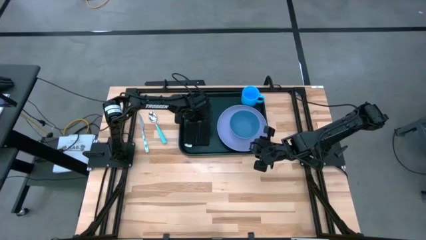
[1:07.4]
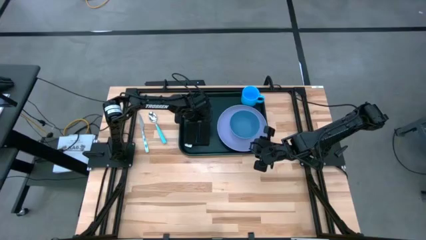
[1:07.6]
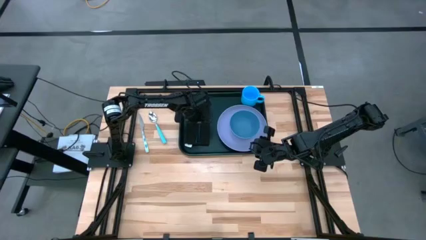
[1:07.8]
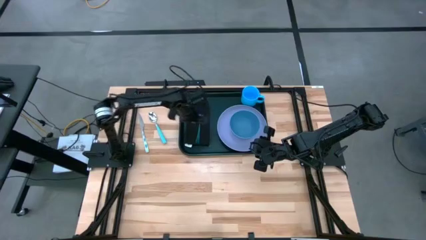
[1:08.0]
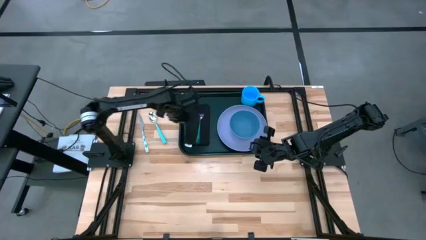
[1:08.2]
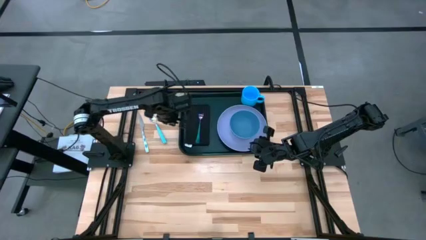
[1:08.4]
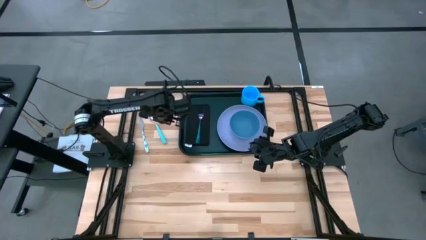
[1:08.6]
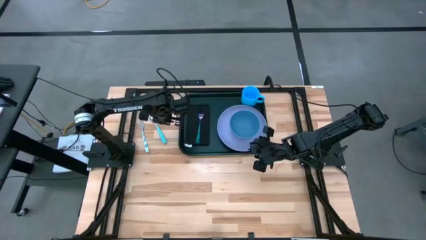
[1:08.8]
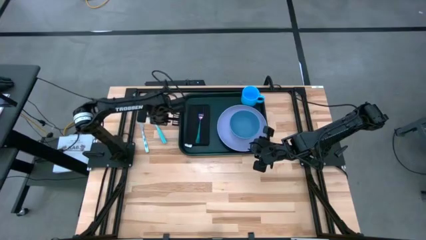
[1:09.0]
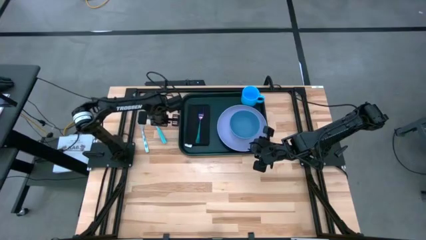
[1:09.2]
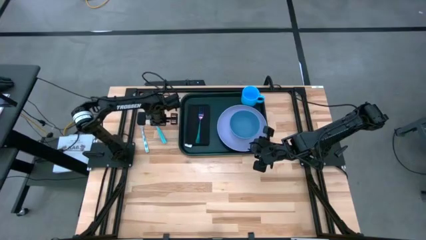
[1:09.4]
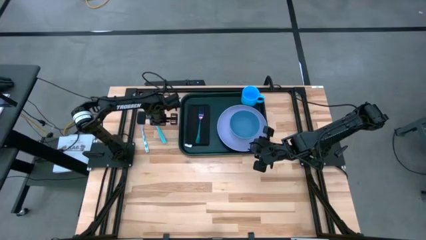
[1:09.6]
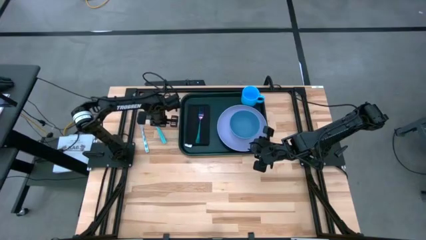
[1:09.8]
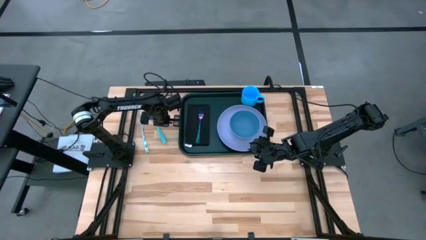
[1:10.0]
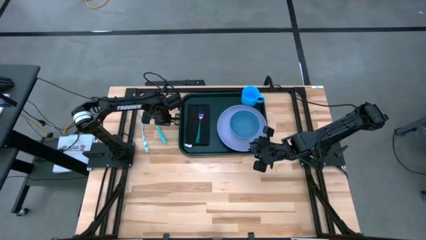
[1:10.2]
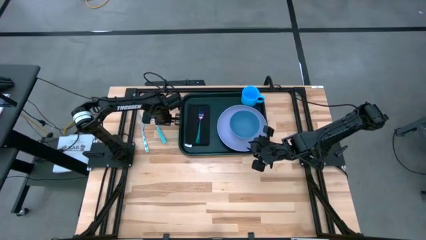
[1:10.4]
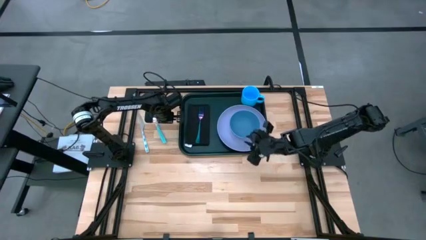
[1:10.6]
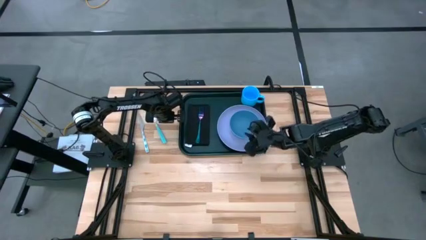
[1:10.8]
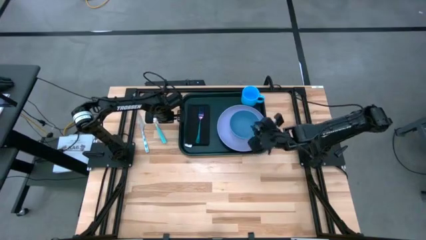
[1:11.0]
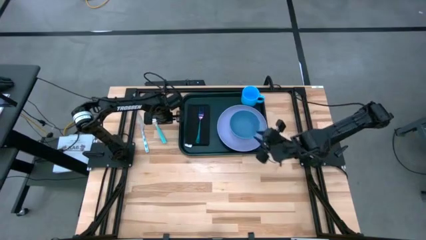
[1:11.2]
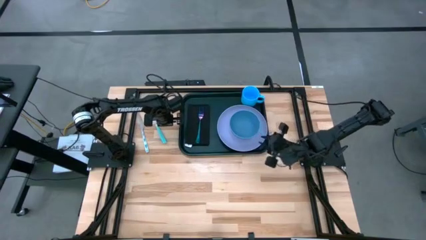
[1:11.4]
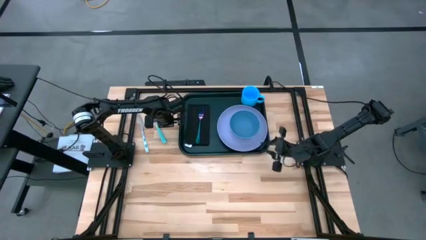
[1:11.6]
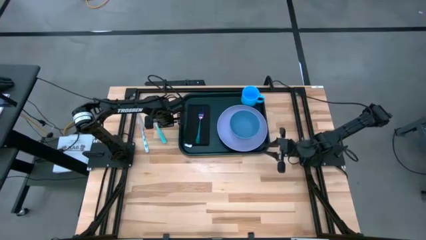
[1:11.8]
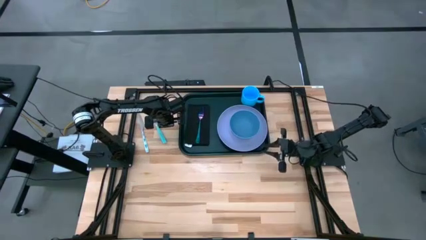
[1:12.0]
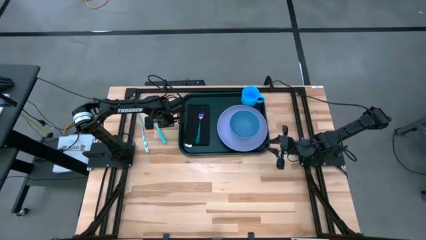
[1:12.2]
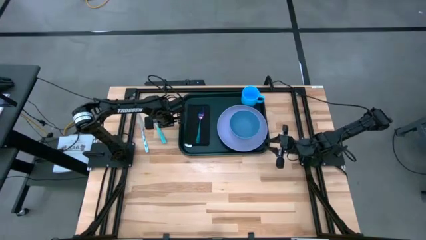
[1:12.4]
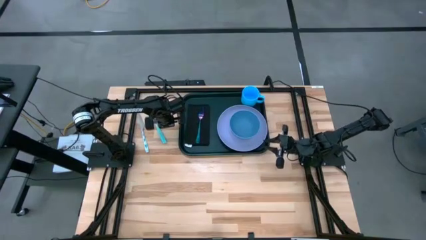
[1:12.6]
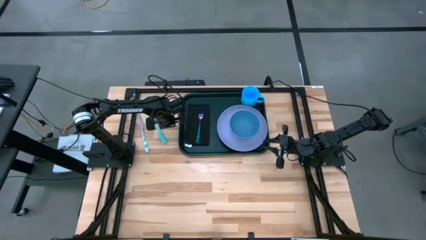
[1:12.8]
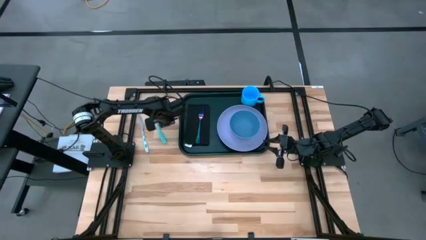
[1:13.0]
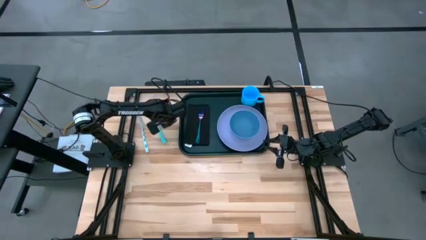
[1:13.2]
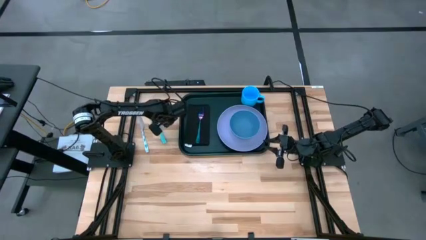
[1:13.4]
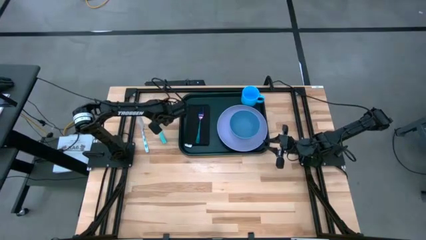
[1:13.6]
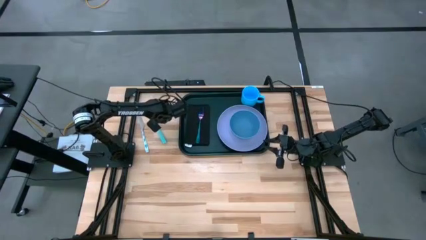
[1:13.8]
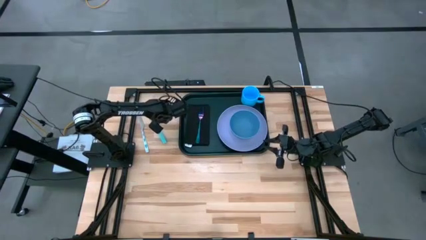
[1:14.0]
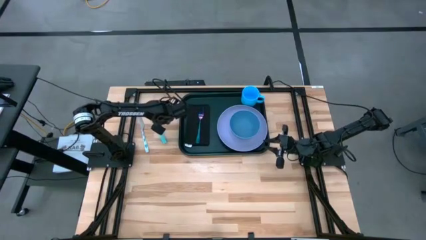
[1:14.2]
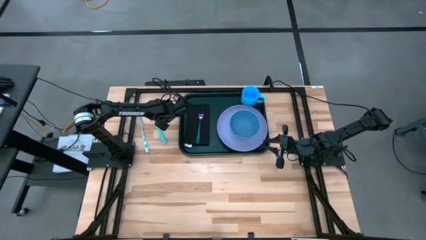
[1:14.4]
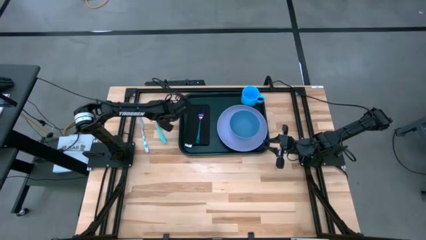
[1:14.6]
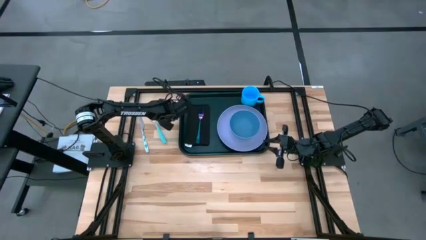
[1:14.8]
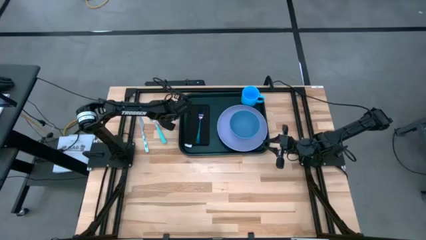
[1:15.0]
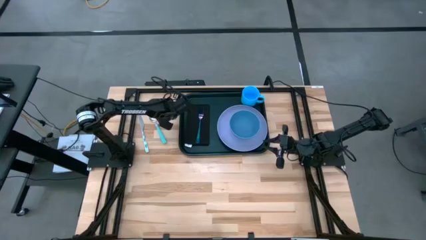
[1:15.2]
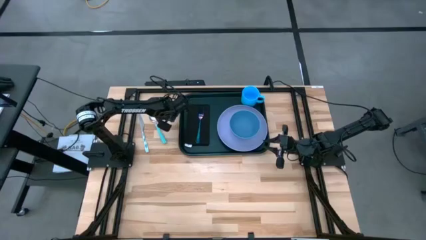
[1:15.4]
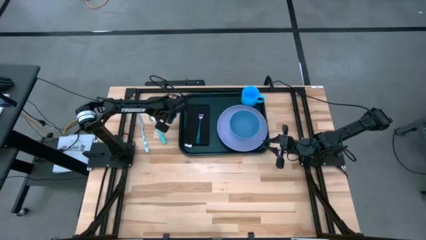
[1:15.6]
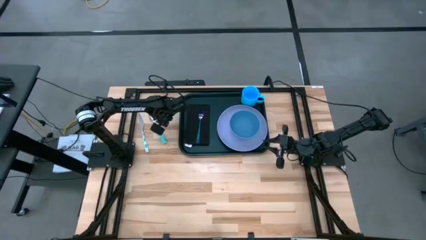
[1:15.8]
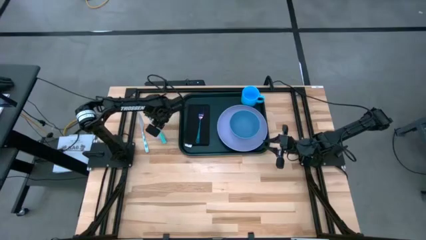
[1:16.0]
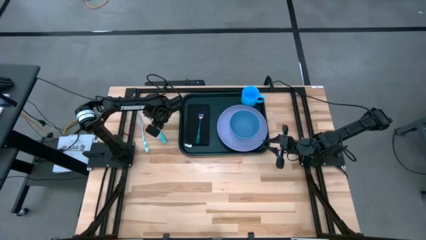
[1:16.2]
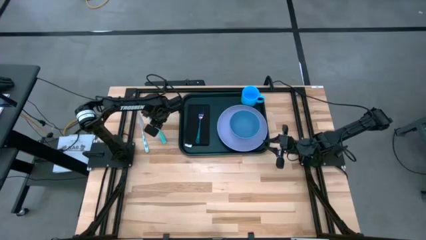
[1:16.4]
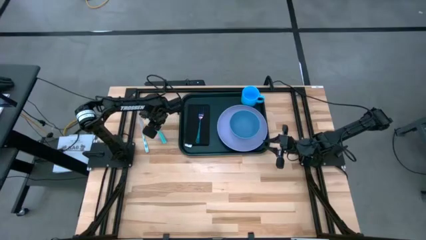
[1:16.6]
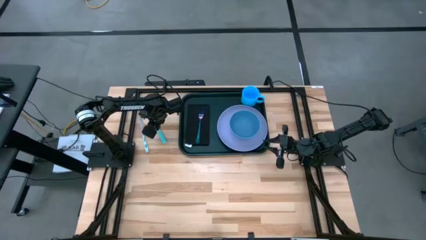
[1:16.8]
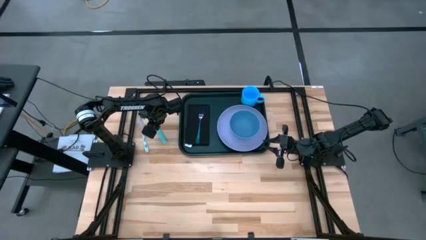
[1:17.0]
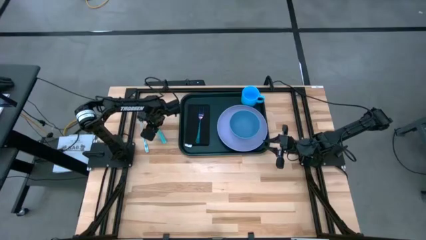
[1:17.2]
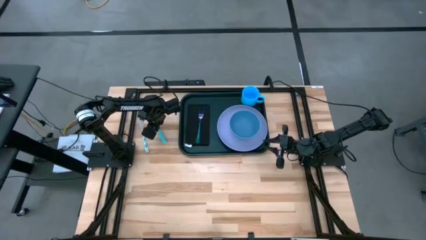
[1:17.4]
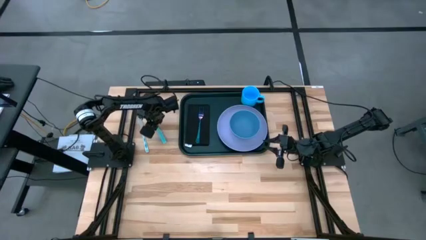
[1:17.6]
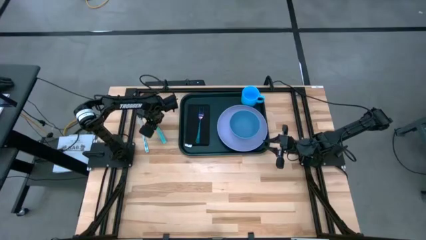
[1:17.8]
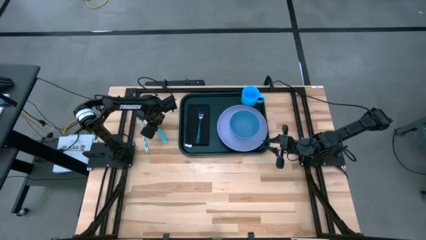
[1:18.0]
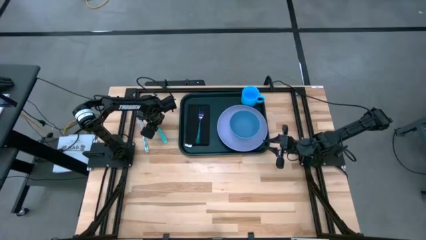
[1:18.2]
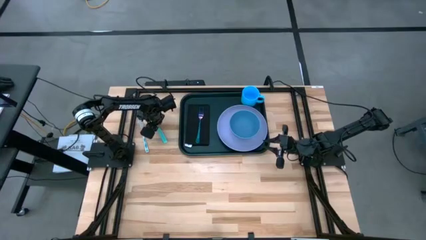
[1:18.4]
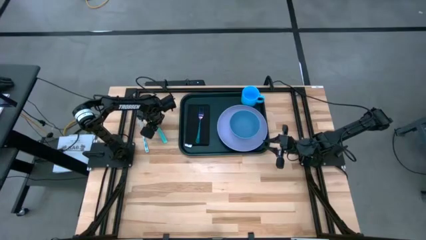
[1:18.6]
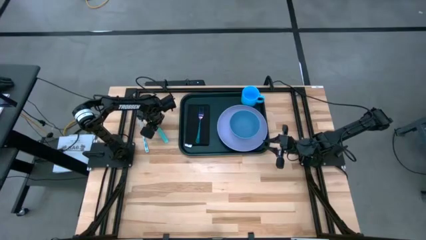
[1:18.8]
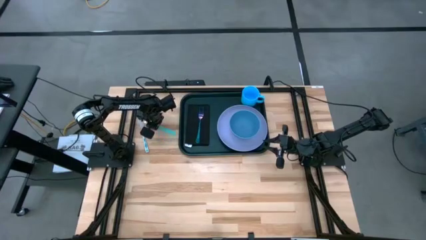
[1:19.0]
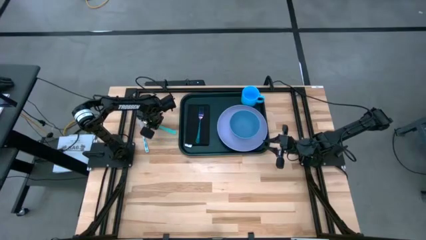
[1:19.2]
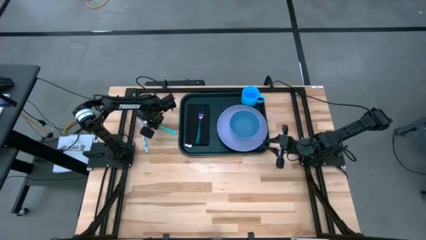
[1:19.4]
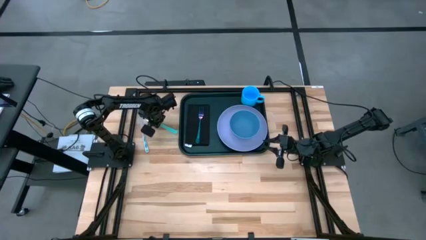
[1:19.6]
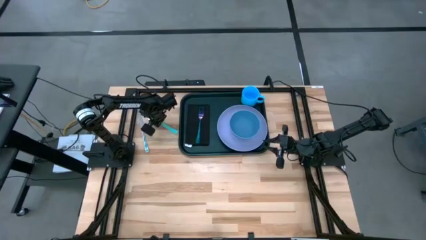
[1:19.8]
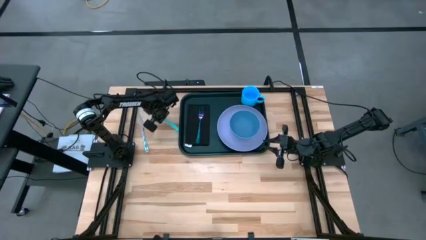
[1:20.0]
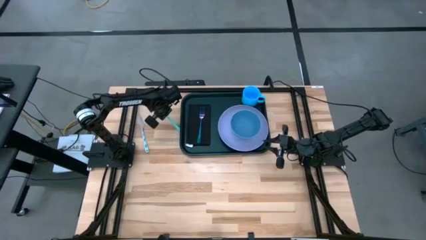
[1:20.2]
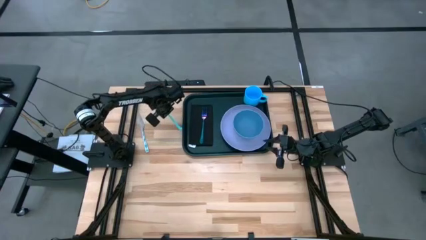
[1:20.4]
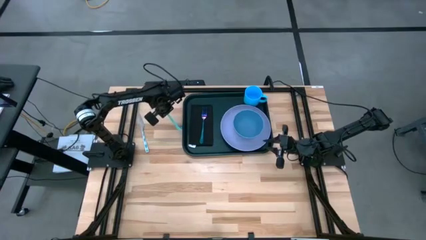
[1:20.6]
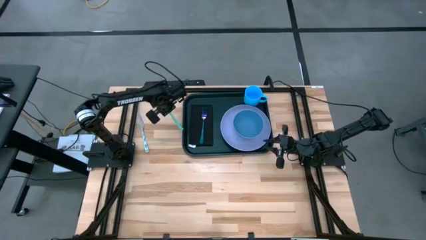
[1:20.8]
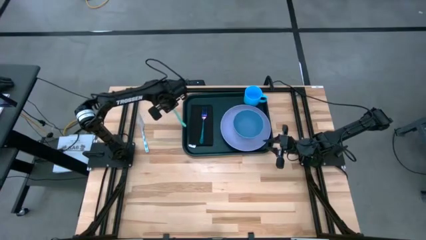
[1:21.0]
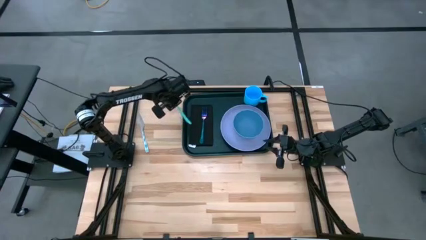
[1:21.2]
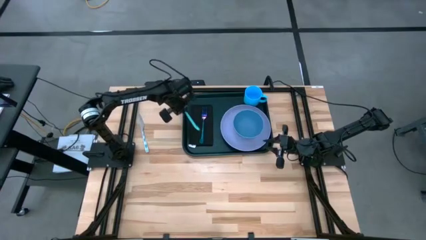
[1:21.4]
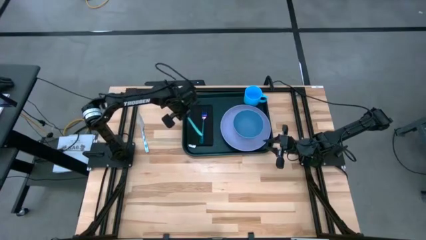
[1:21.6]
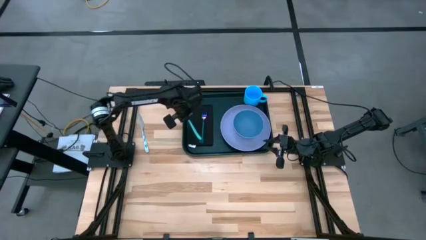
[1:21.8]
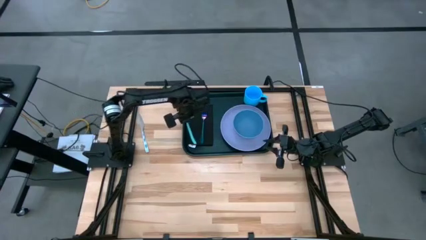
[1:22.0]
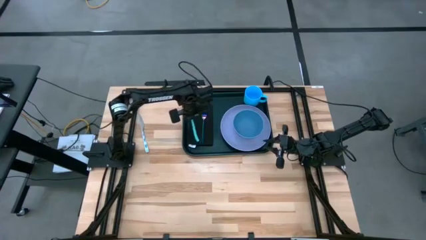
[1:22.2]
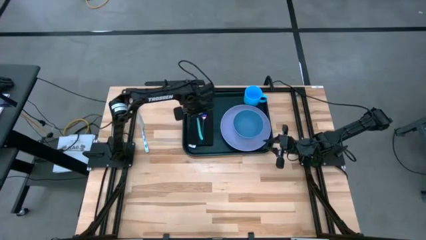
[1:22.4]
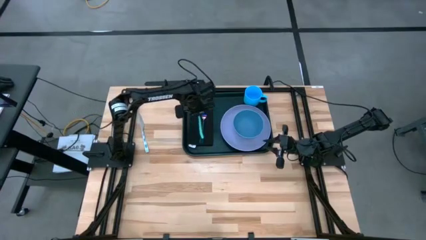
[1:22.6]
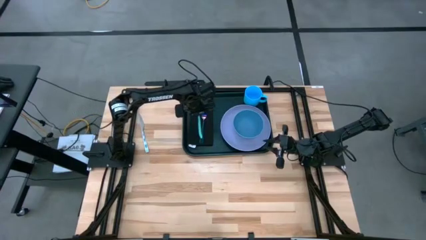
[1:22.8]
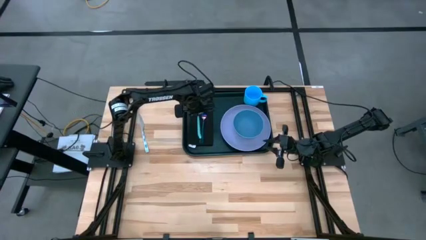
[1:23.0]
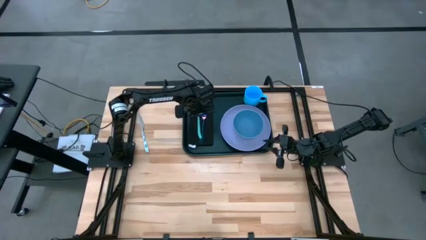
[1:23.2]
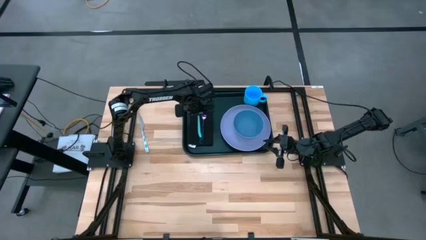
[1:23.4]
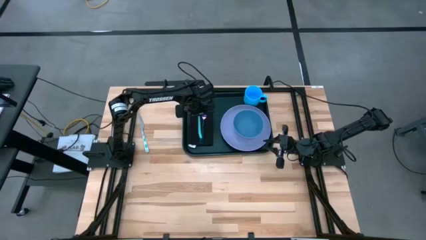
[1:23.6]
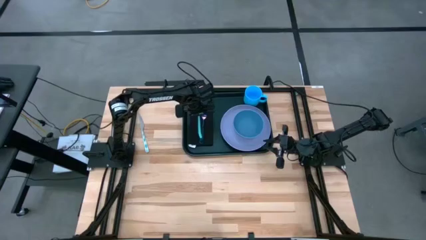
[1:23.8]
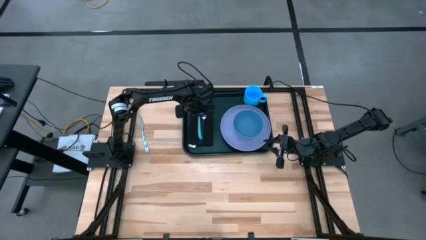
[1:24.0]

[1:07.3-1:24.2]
Task: Set up tray
Put the green spoon on the black napkin
